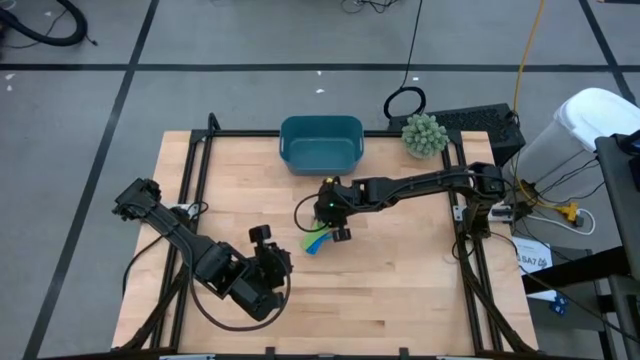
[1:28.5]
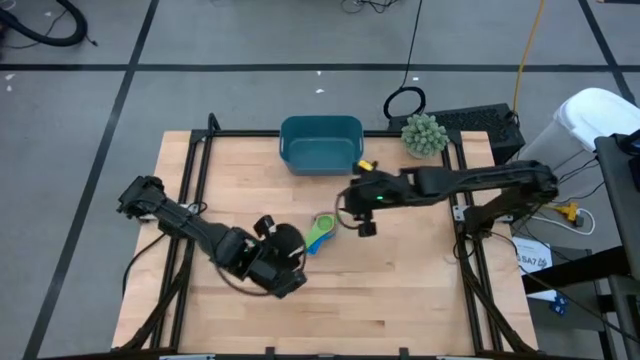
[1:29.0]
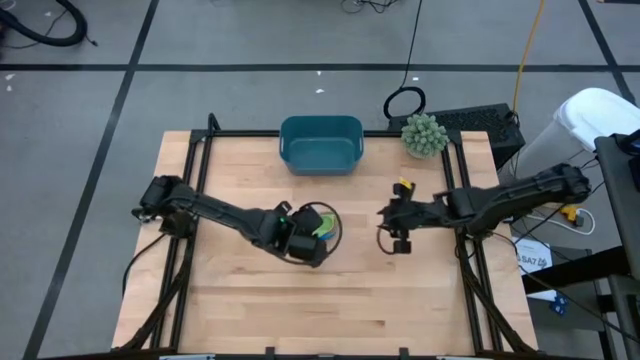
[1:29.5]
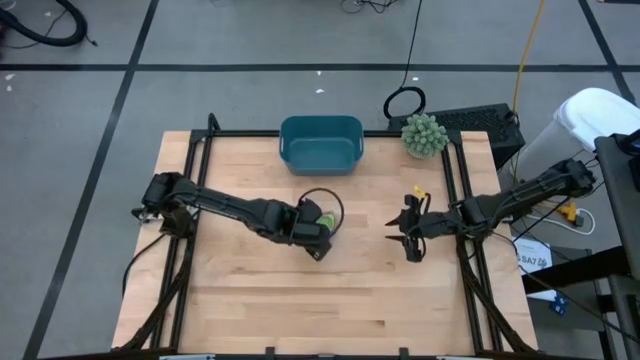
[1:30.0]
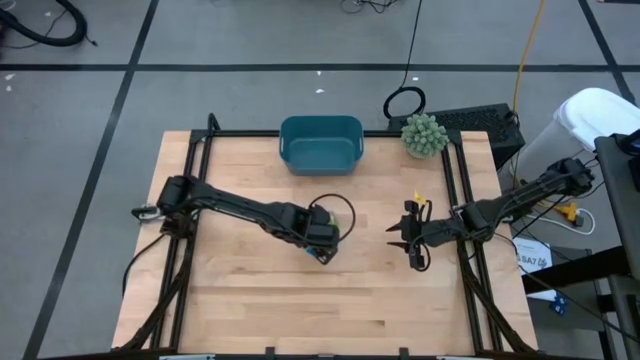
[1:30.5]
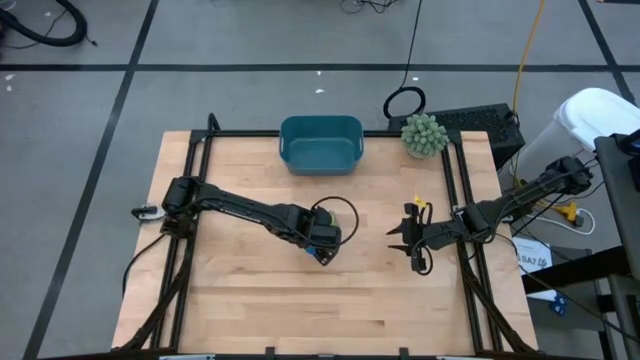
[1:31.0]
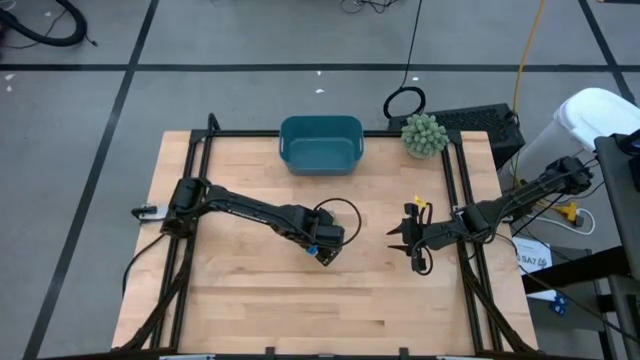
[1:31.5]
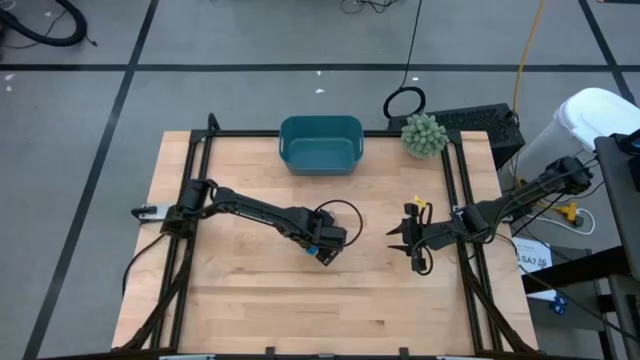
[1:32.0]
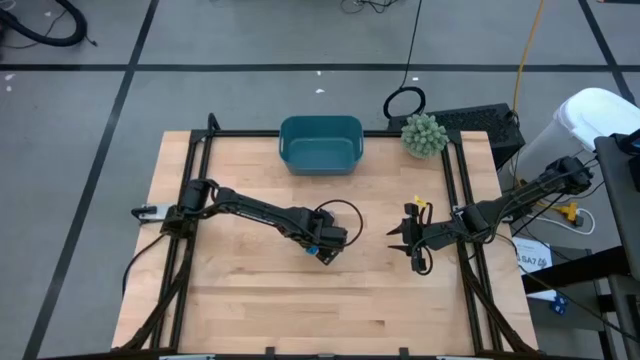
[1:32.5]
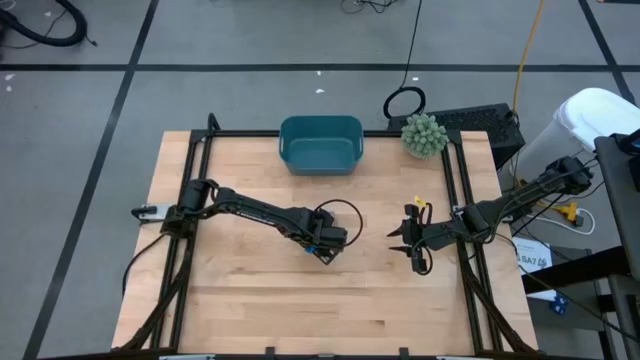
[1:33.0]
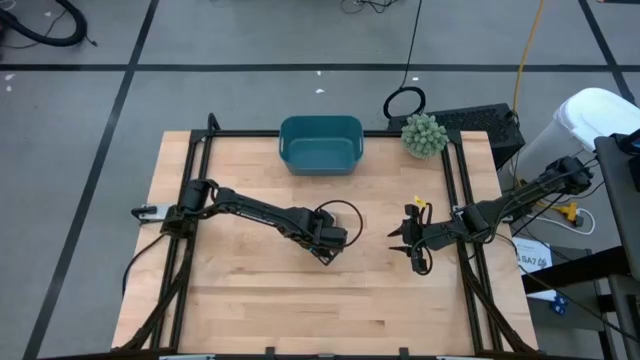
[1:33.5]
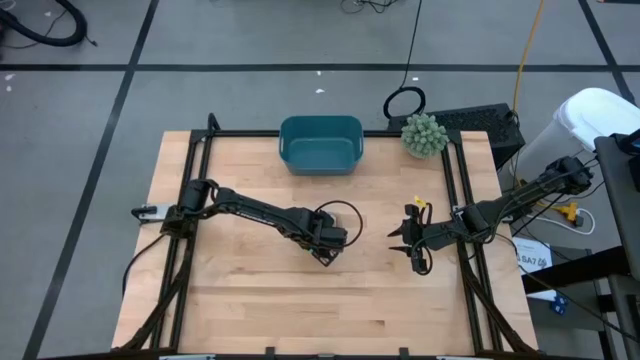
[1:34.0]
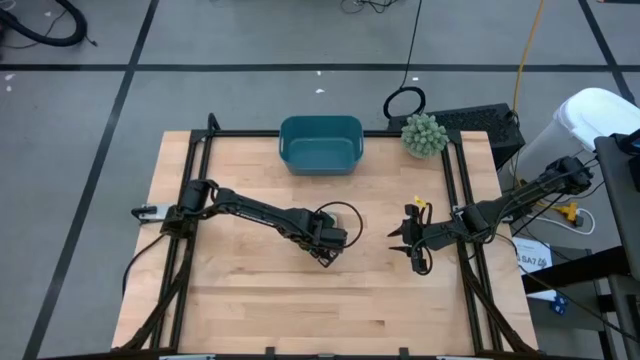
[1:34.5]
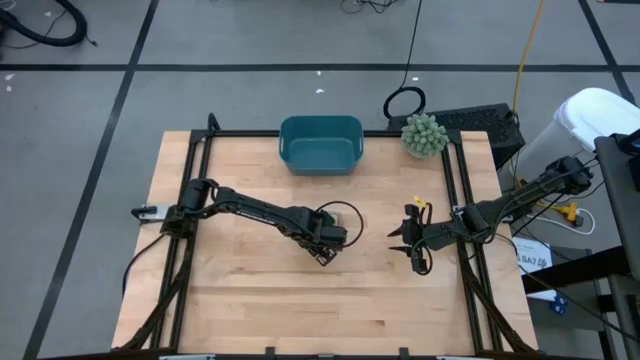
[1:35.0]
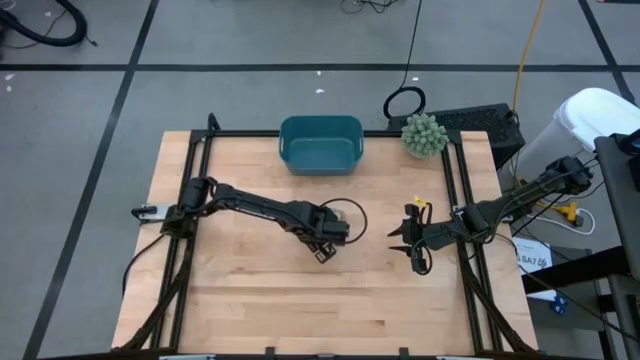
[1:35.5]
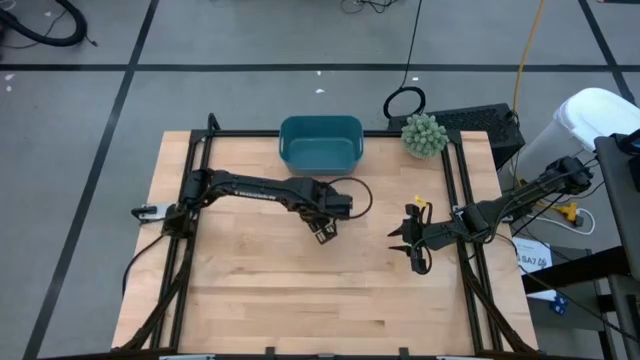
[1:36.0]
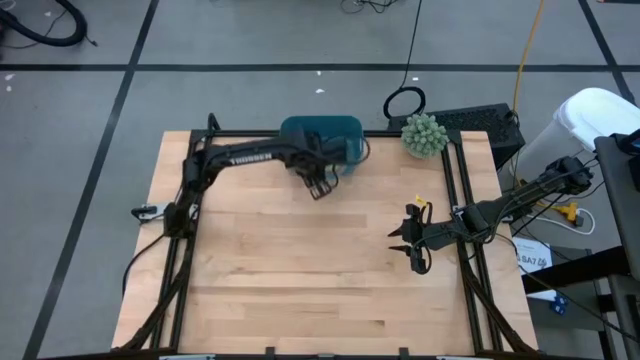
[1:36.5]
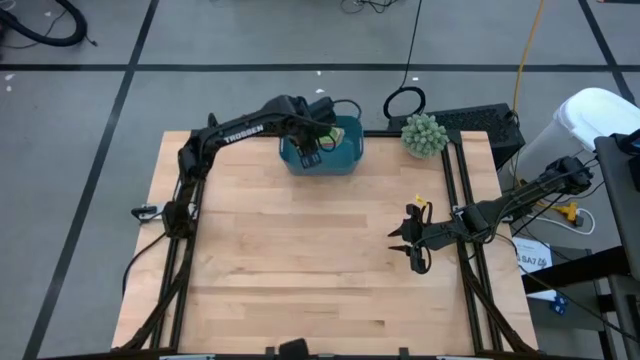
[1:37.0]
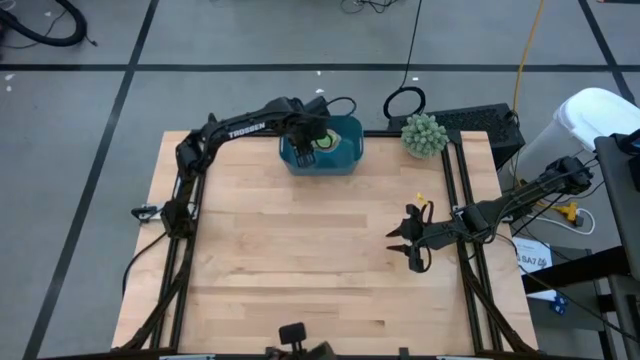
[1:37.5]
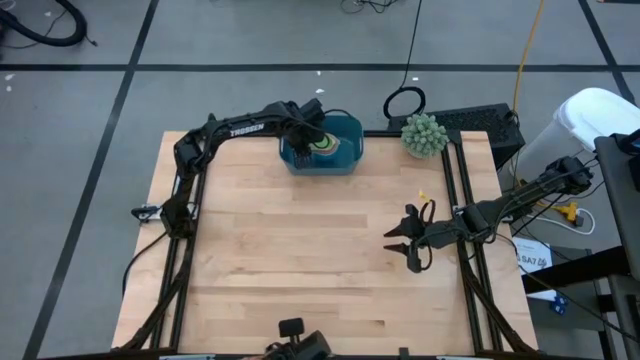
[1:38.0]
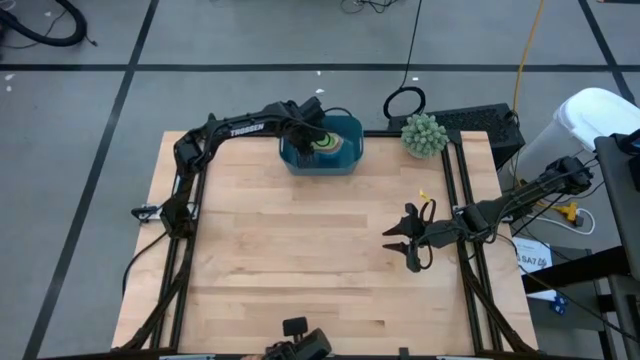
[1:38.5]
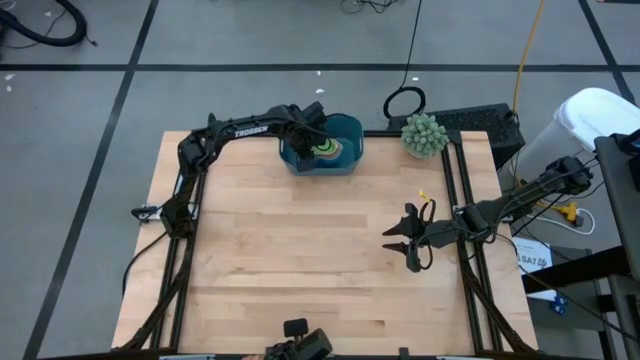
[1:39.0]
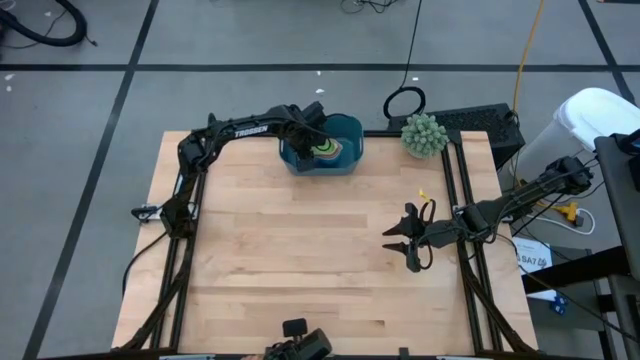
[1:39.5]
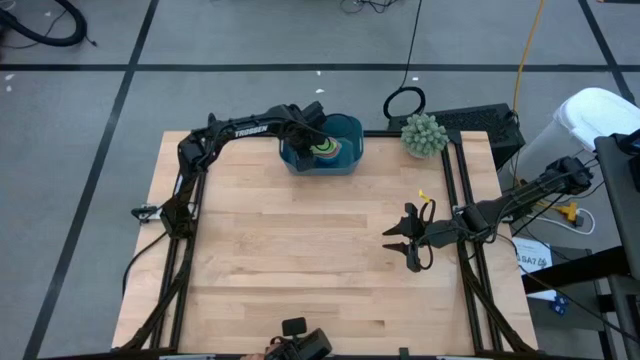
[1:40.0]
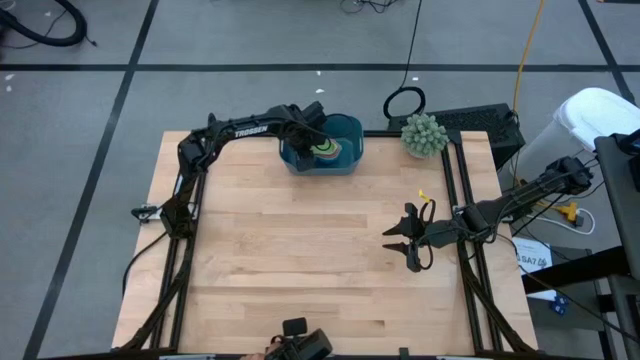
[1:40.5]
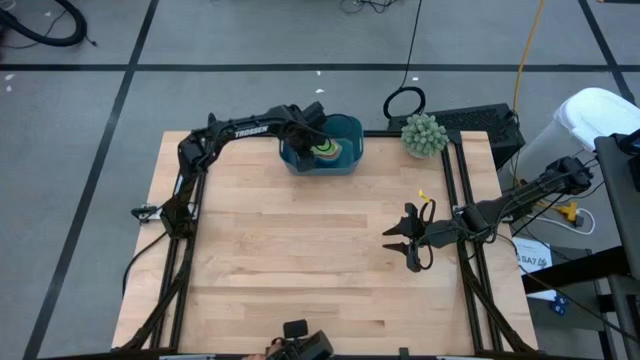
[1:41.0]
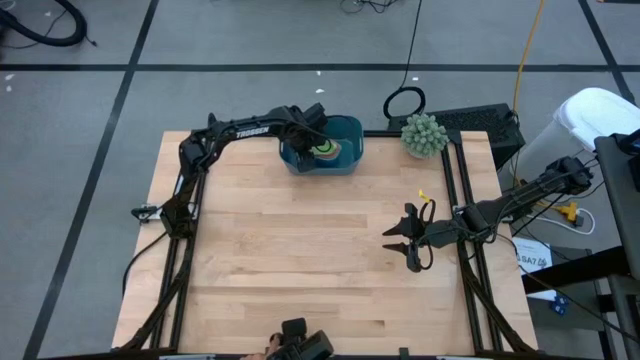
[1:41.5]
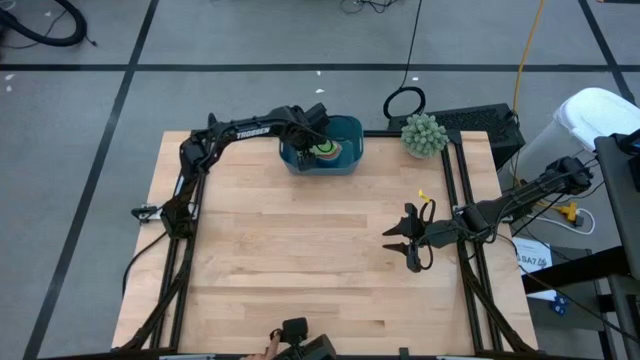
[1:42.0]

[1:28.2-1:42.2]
Task: Nest measuring cups in basket
Put the nested measuring cups into the blue bin

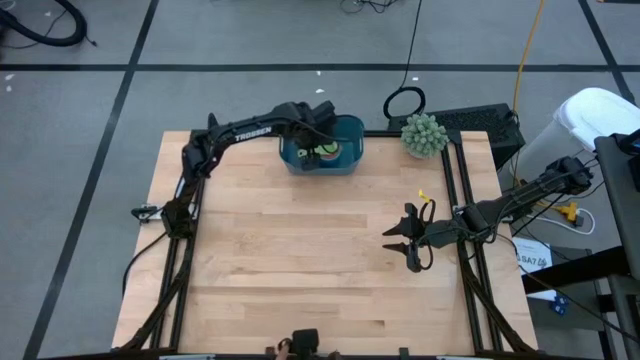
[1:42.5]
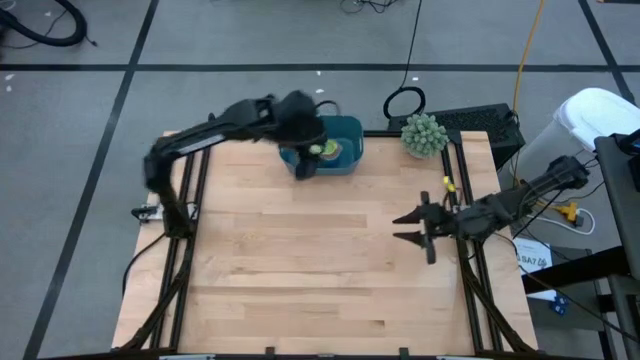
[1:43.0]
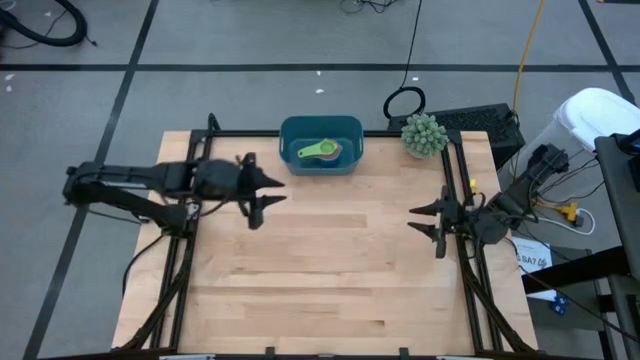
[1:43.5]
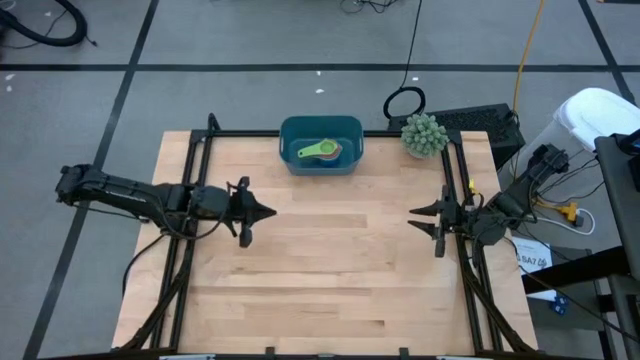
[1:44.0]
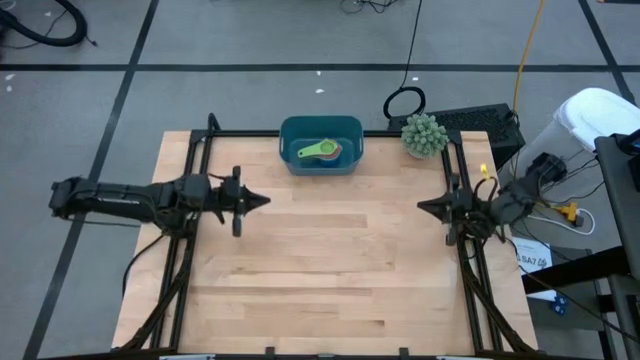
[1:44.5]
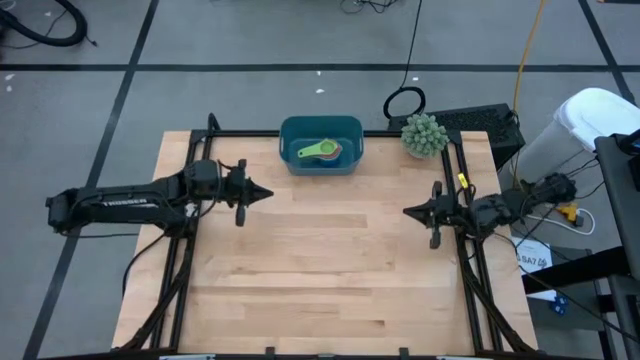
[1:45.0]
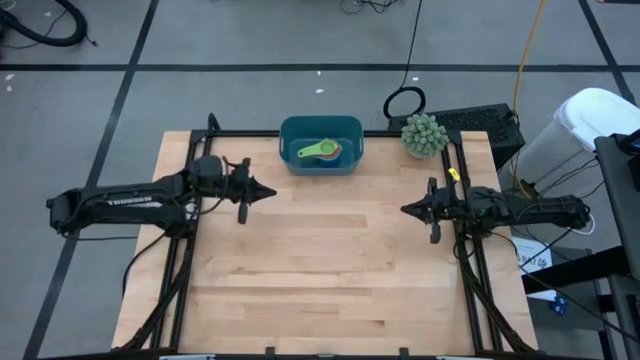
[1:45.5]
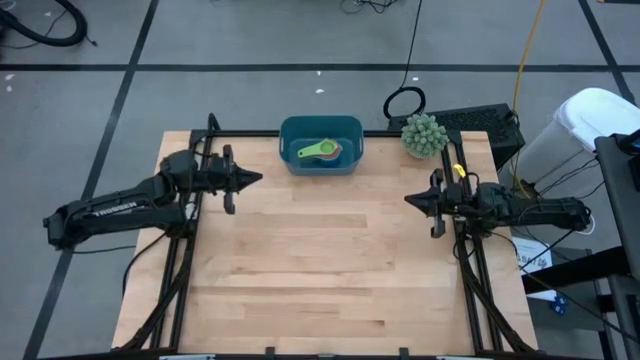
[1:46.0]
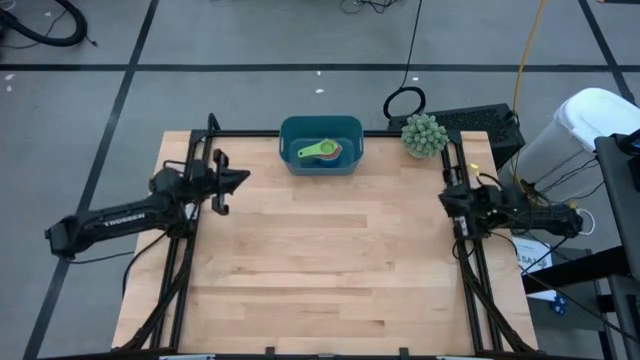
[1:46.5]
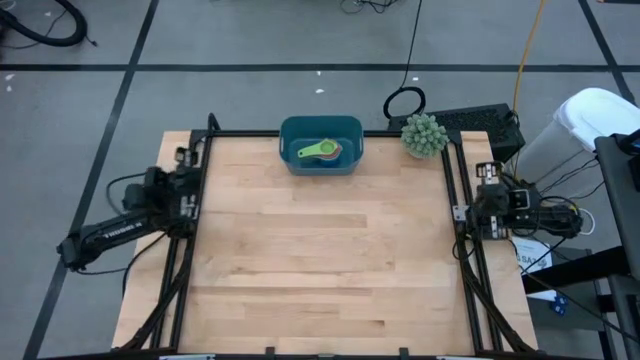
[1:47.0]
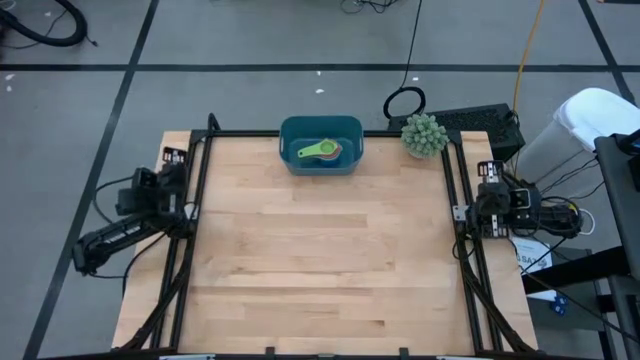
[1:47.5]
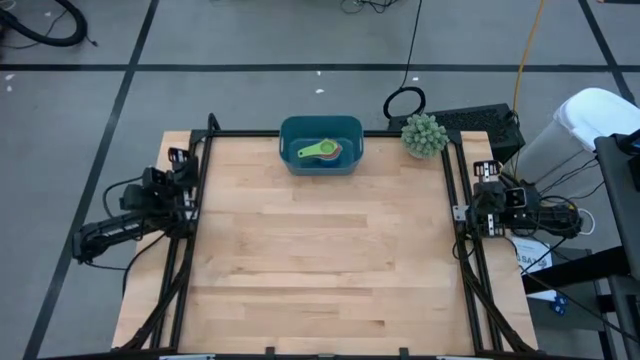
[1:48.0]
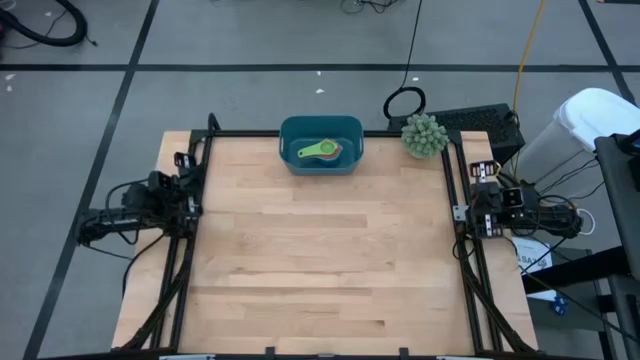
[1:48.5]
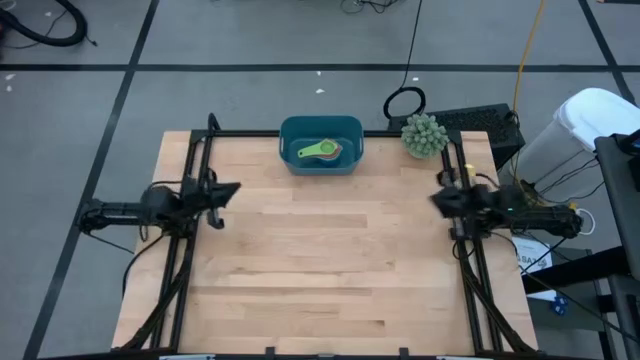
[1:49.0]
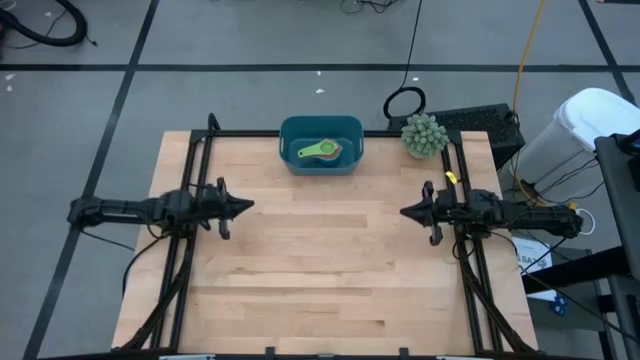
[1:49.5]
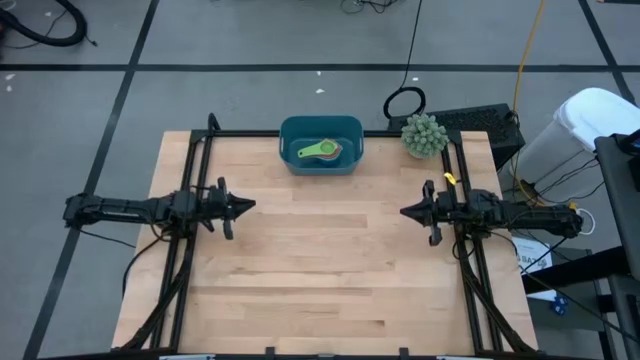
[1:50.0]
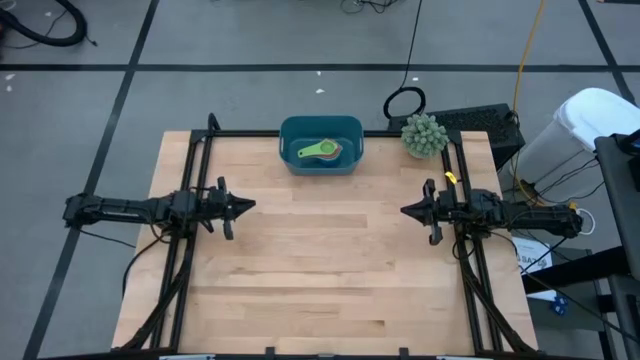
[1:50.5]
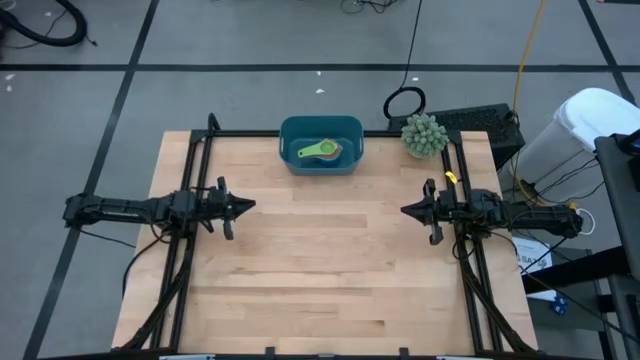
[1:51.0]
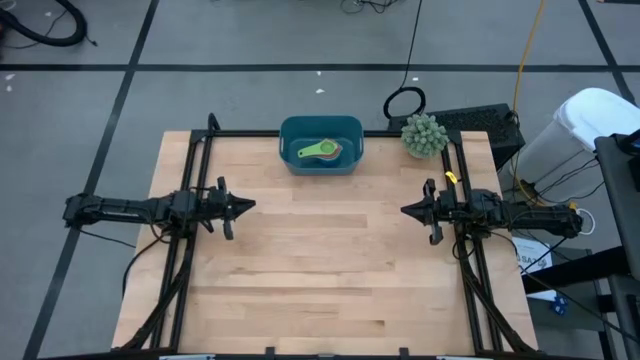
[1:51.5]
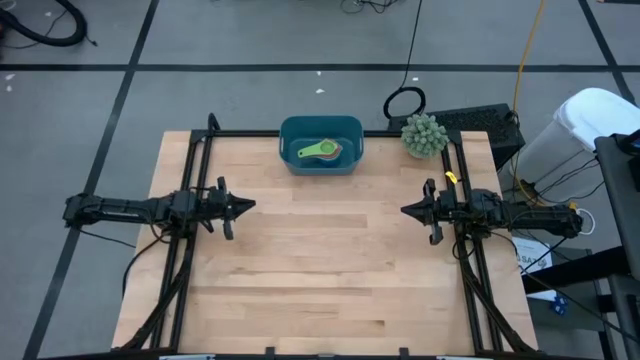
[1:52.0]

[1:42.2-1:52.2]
Return to Home Position
